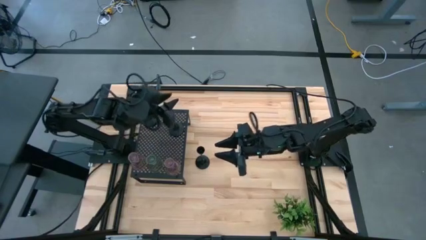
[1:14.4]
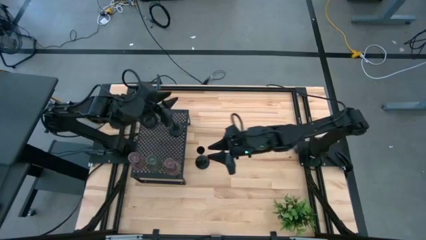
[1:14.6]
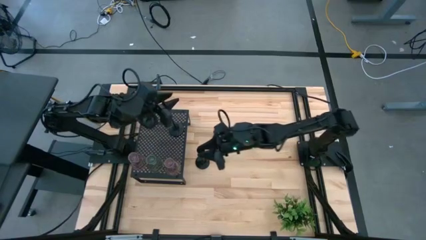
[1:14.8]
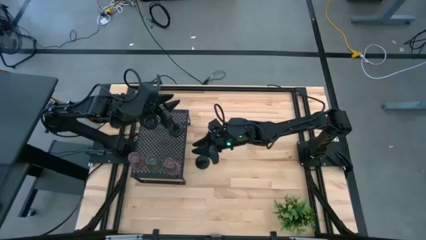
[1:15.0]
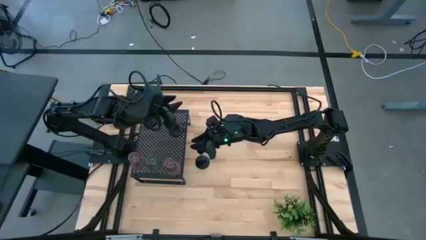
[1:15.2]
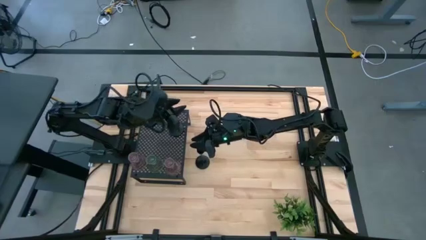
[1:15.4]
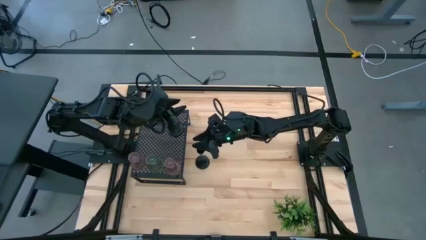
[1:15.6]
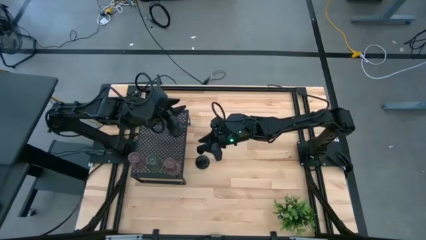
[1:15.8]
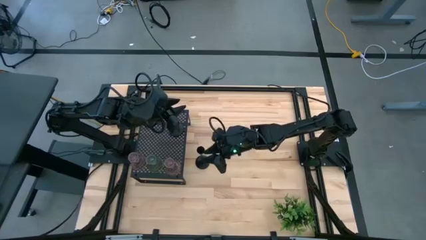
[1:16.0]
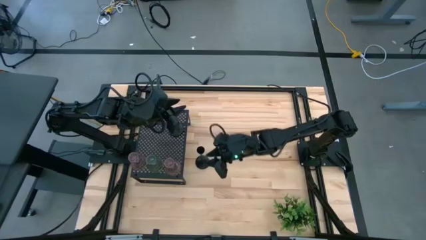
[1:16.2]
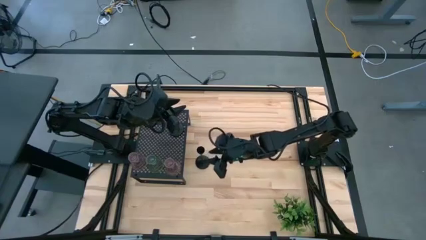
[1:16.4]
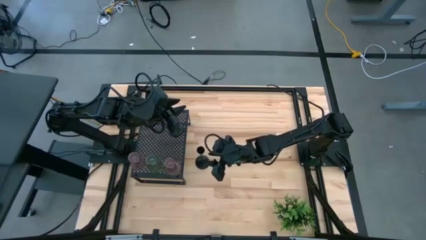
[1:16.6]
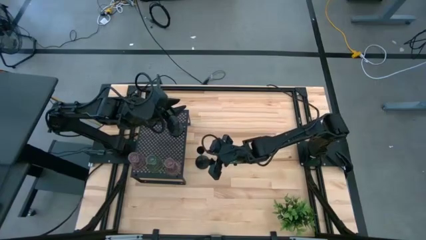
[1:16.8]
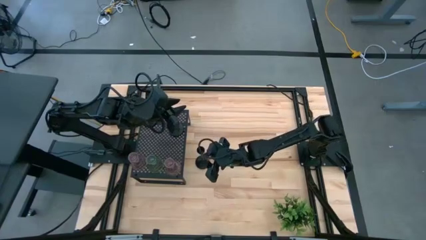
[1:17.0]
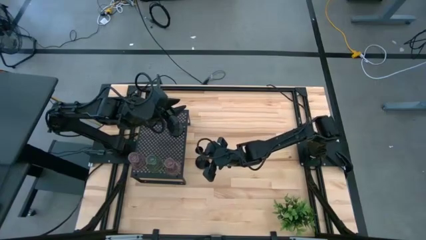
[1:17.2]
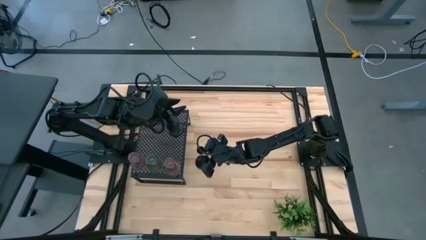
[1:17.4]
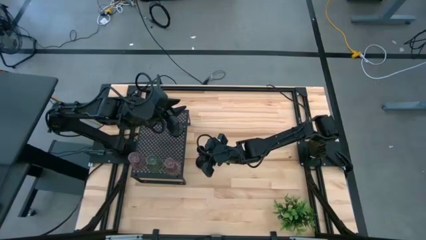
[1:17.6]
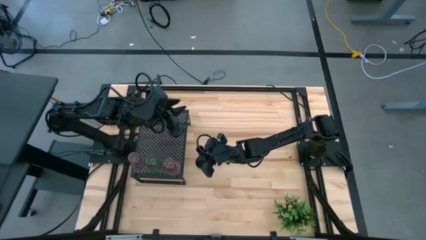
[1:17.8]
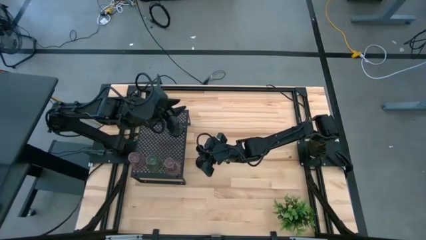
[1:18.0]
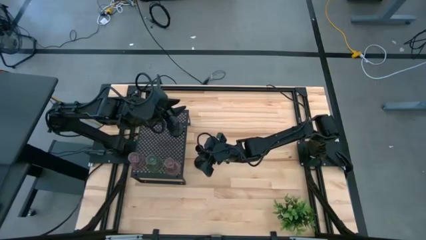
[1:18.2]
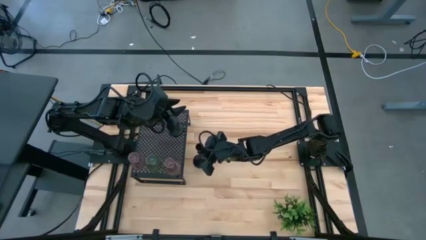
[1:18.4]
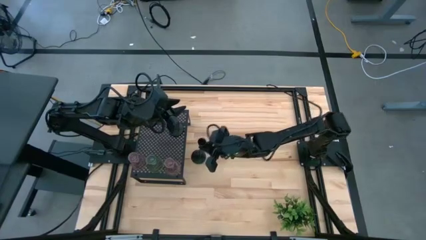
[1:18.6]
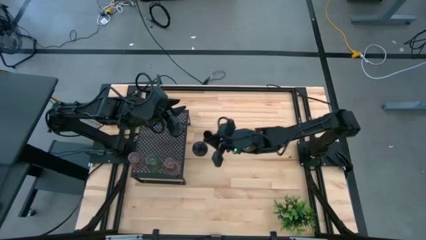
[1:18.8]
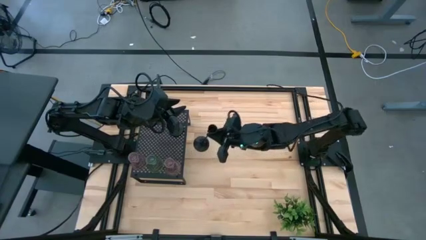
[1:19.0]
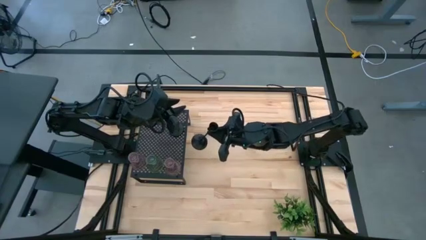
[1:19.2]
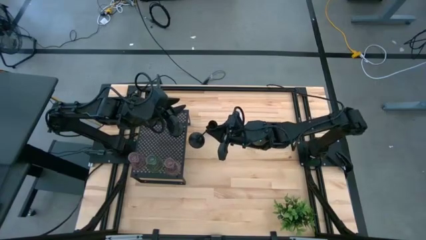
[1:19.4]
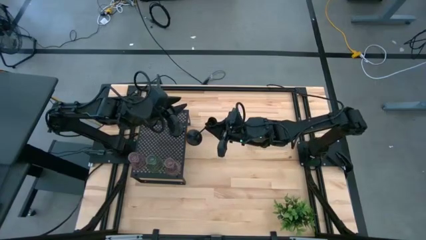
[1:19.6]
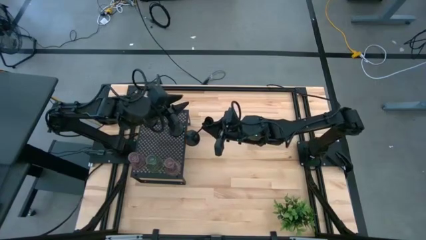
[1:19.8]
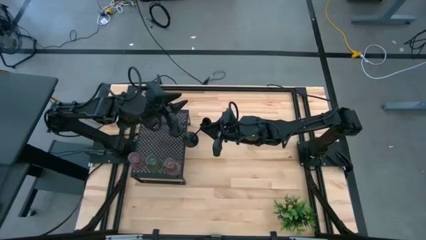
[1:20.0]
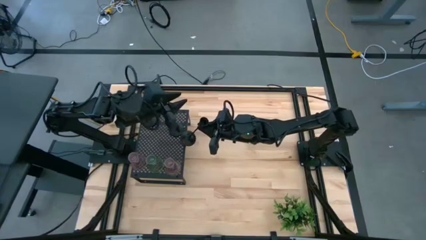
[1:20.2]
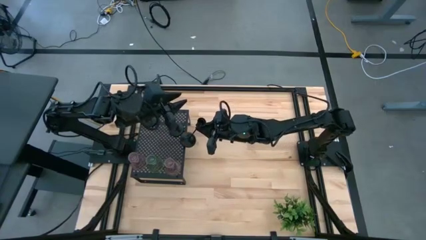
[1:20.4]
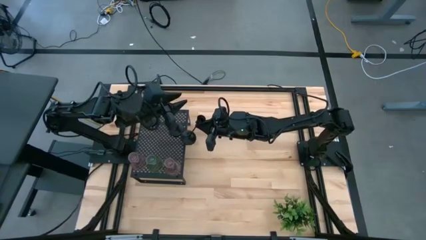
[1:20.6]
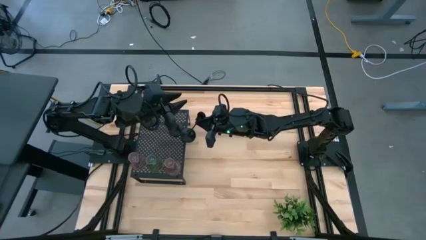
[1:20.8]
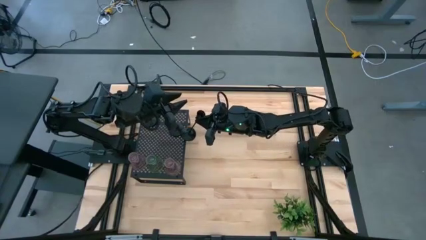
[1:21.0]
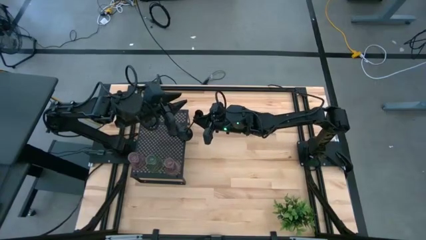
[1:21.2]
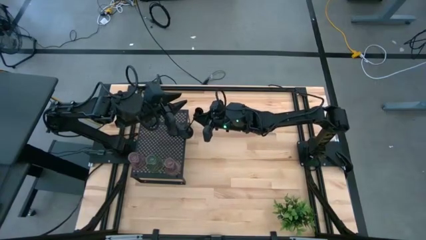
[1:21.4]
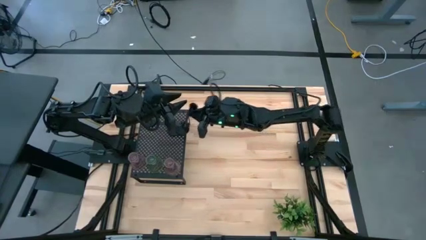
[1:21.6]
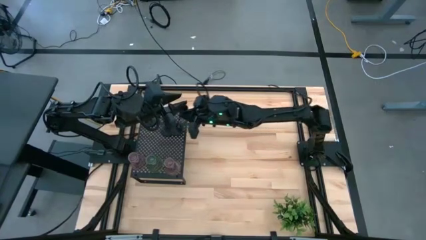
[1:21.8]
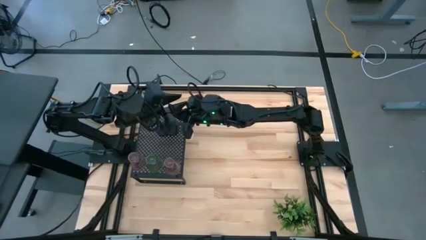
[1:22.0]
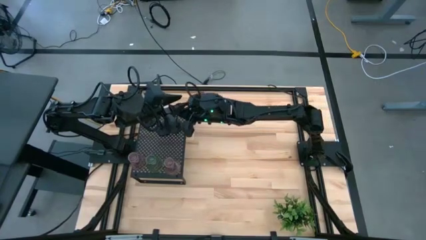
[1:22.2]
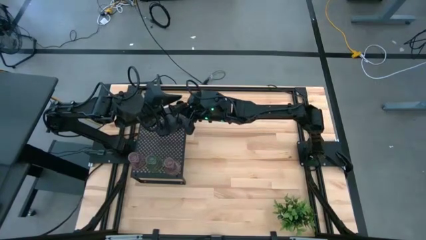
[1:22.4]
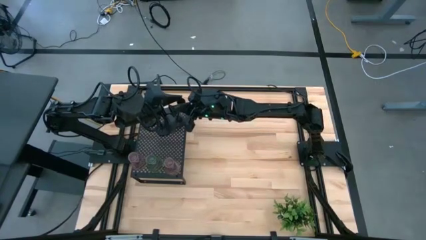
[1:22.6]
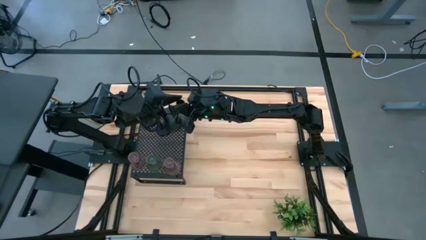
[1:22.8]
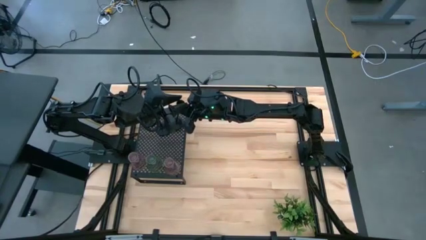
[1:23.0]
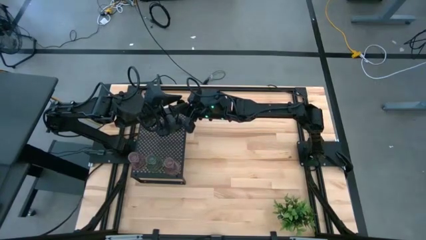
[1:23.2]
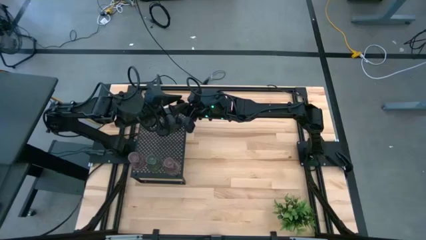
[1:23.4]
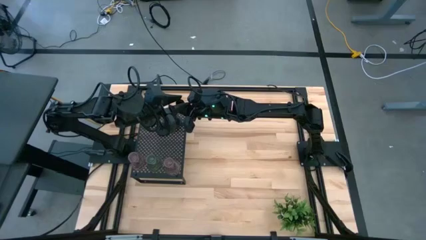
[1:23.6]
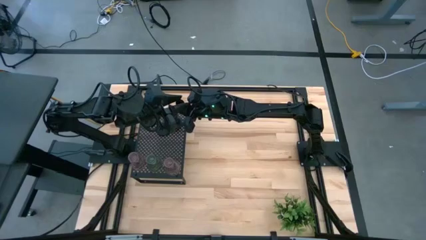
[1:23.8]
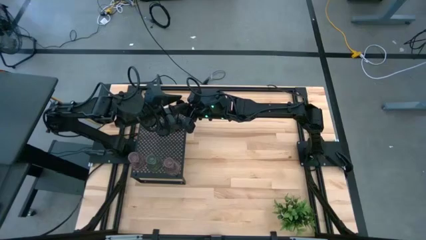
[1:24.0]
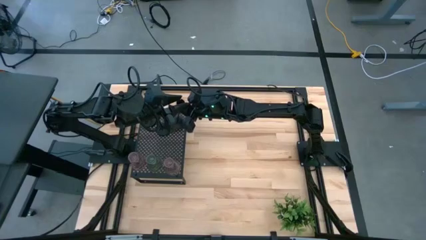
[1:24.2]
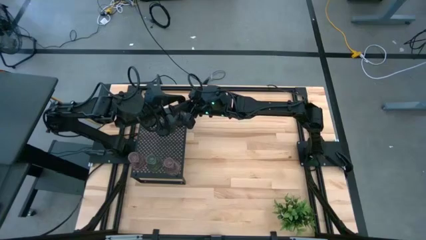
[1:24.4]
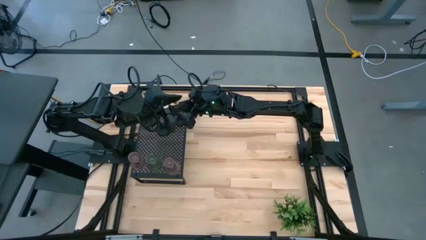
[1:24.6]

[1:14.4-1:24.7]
Task: Pick & Place candle stick holders
Put the black candle holder on the shelf
